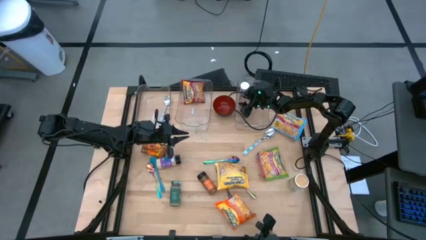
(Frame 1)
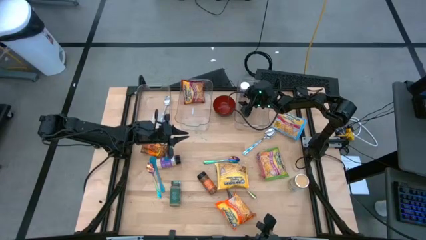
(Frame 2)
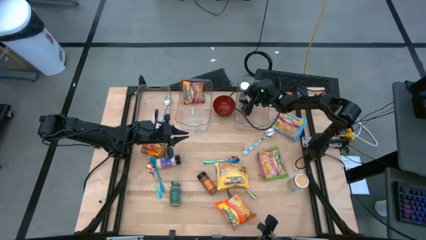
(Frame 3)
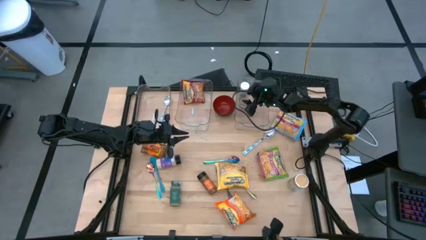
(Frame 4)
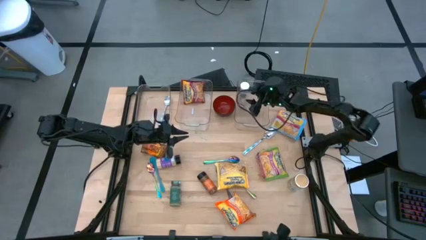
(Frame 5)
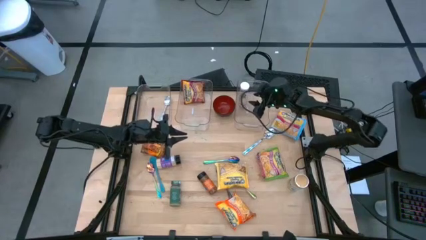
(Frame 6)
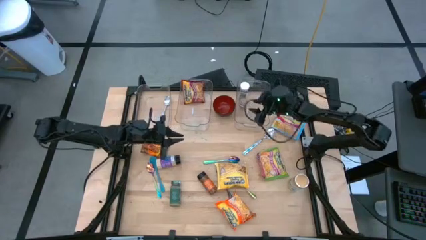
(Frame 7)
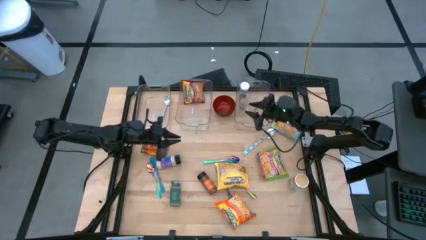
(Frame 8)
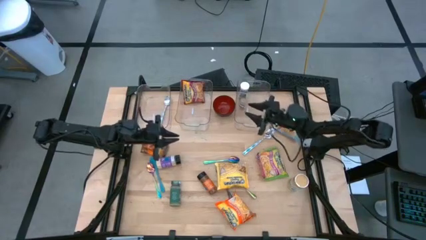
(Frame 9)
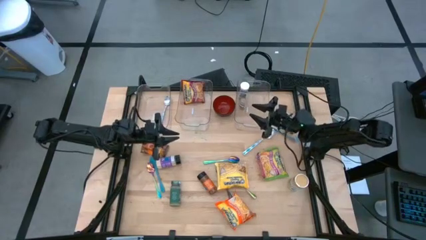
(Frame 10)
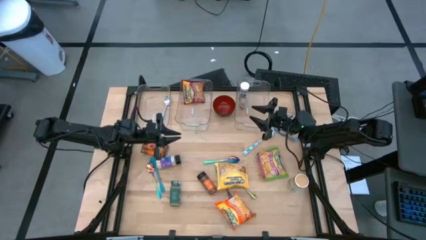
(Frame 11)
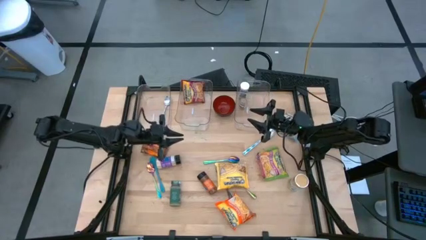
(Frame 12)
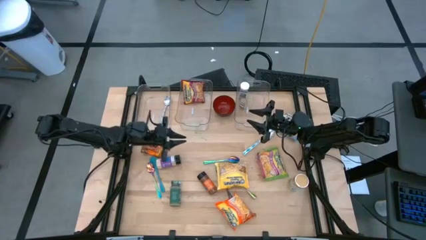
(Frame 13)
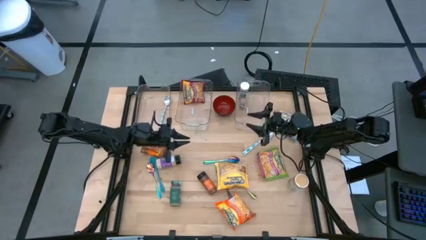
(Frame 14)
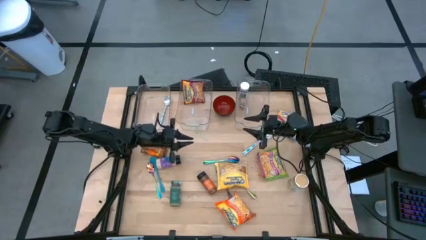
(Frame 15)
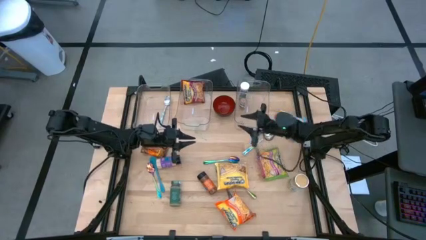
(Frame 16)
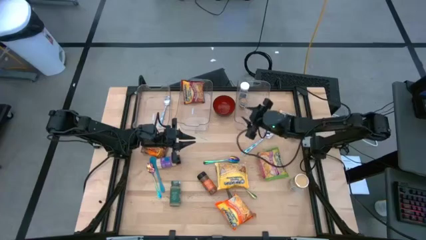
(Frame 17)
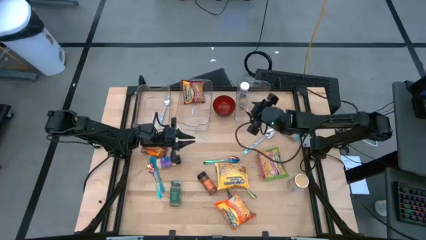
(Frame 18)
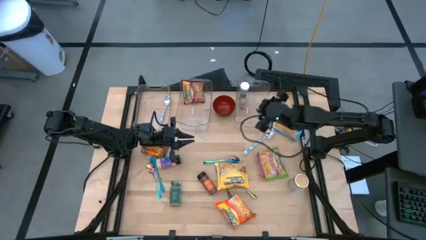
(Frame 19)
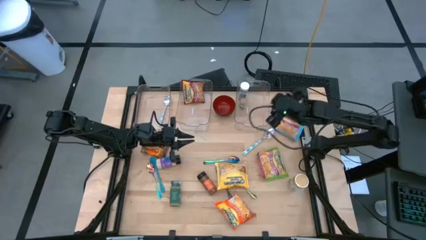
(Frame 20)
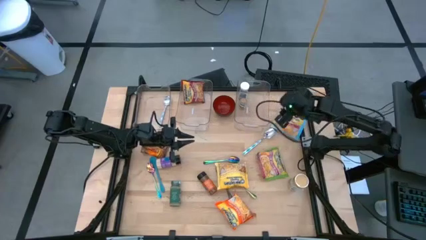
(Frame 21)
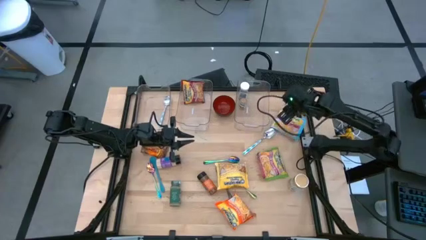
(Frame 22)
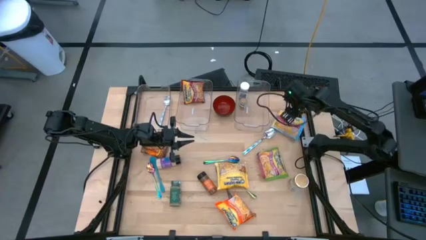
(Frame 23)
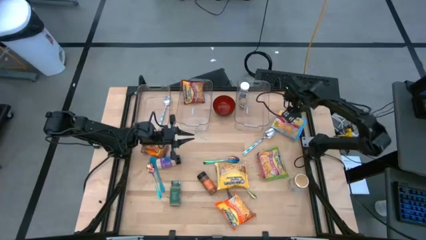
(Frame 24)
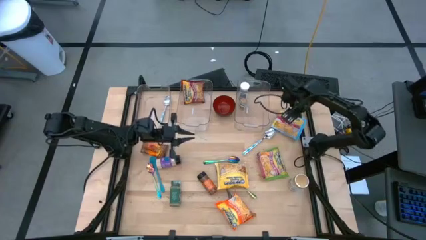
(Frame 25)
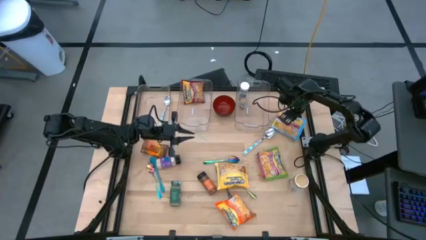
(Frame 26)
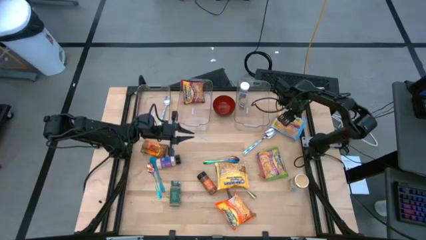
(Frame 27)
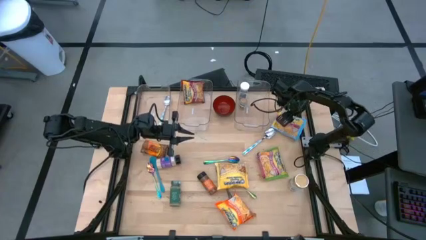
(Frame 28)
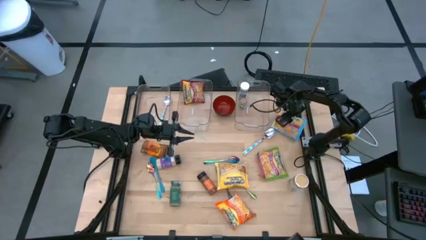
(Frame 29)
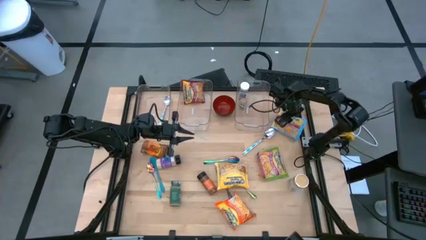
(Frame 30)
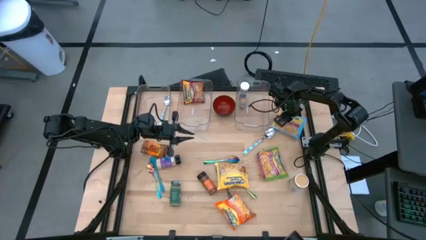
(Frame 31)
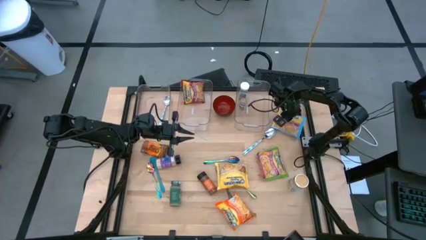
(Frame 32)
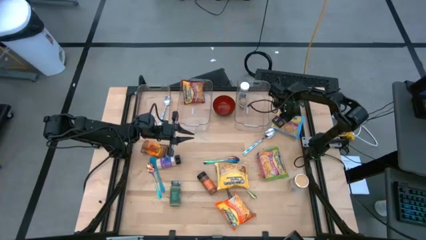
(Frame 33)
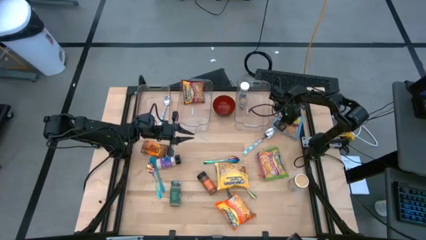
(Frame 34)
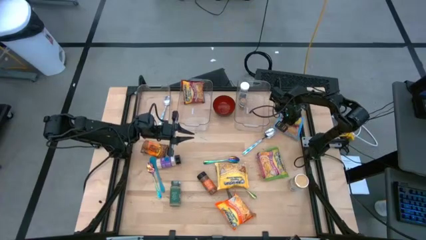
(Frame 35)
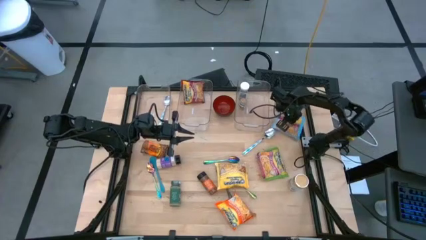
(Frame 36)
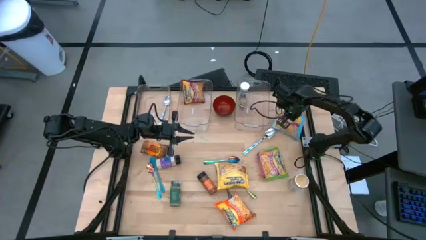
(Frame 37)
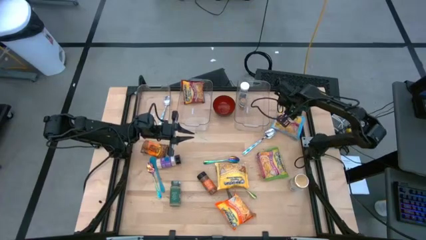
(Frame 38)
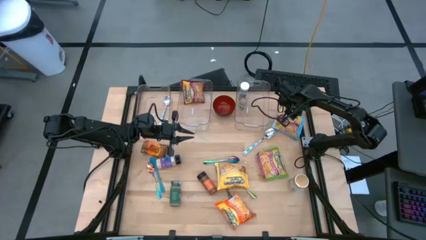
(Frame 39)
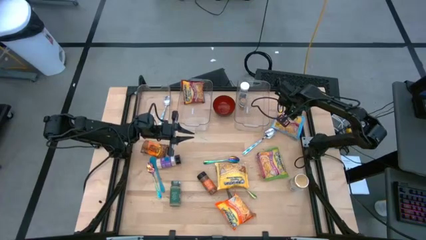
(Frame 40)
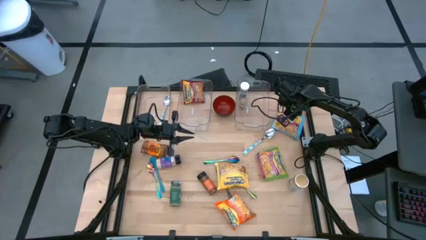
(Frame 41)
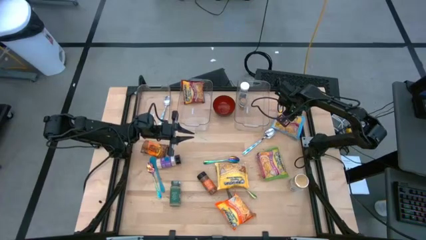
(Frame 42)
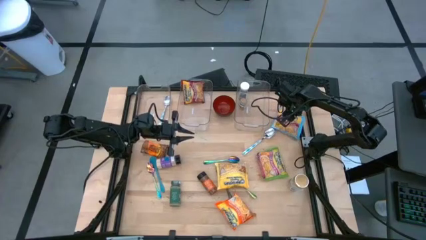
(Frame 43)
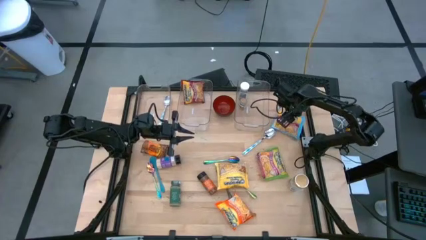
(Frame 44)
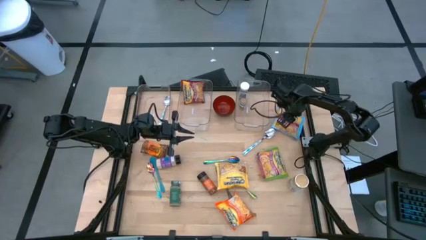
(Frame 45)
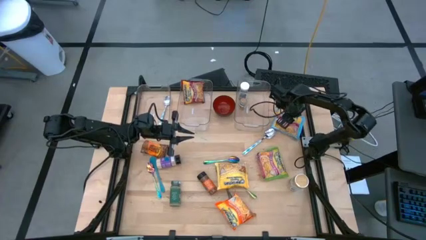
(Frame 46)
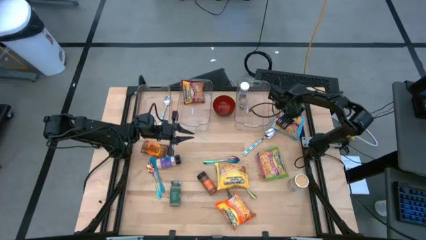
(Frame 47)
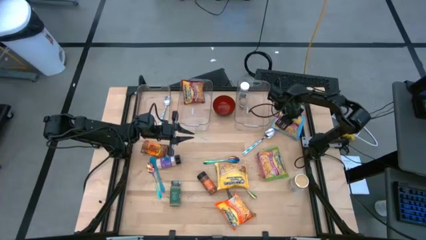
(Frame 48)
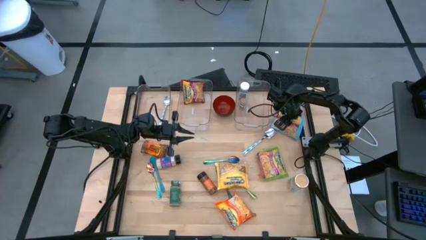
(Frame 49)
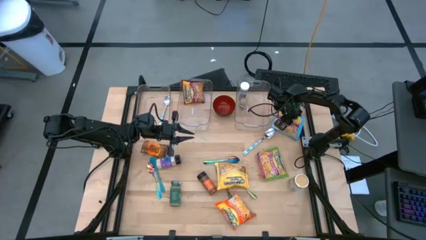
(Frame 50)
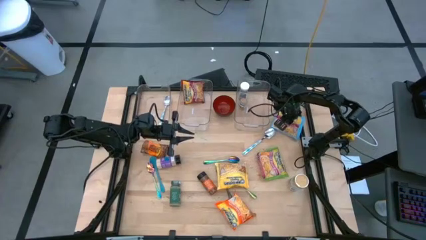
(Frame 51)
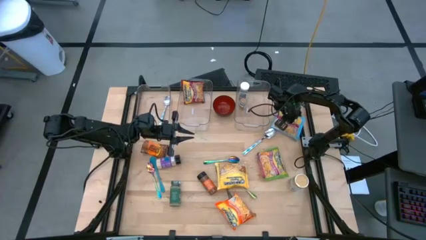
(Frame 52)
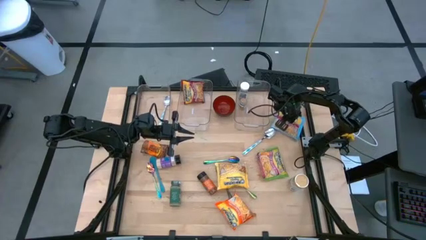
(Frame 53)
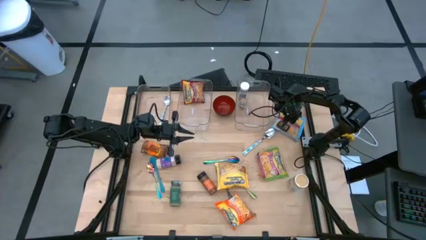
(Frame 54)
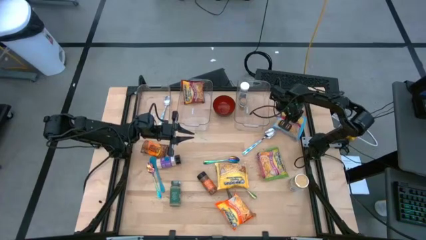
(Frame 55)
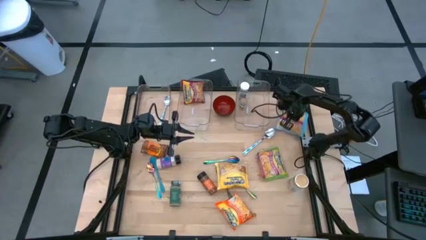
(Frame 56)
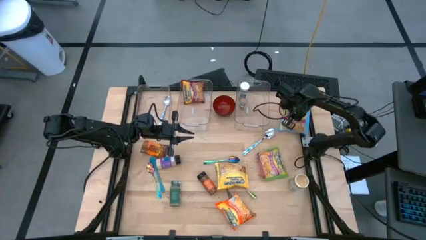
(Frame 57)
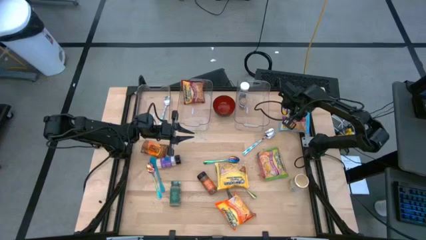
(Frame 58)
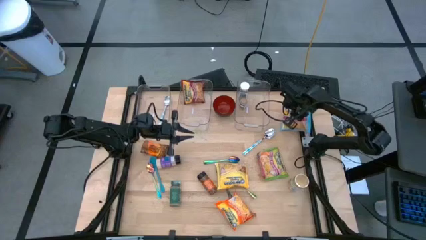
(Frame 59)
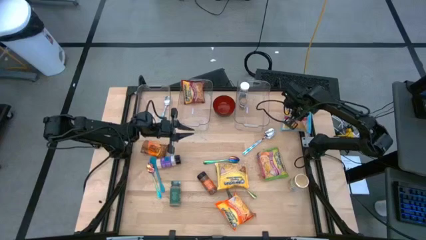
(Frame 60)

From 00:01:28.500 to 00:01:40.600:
Task: Pick & Place Food Item
Put the blue noodle pack into the middle transparent bin
